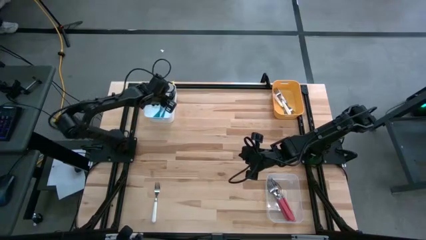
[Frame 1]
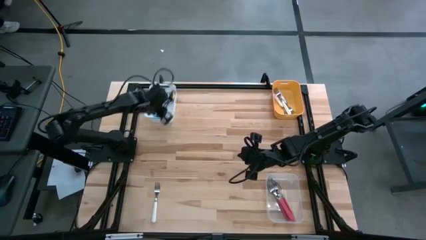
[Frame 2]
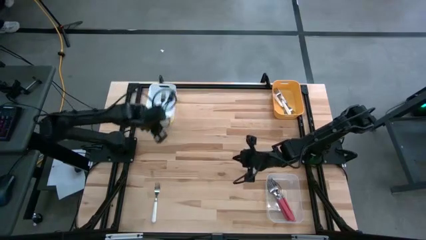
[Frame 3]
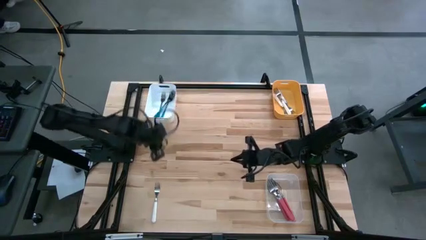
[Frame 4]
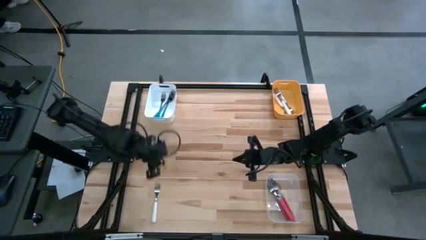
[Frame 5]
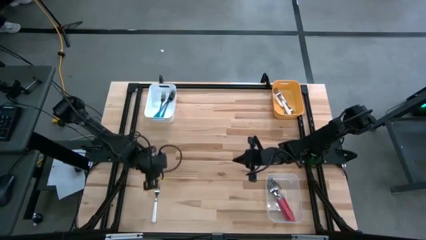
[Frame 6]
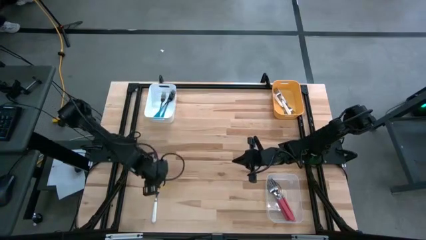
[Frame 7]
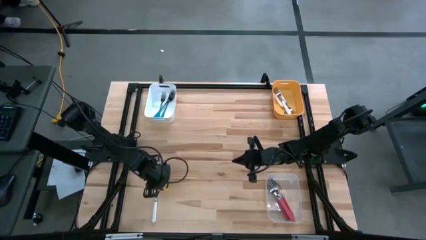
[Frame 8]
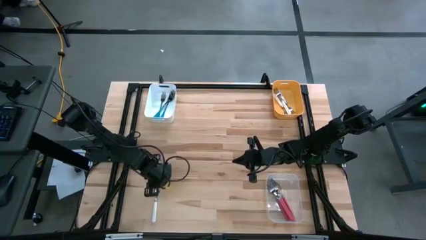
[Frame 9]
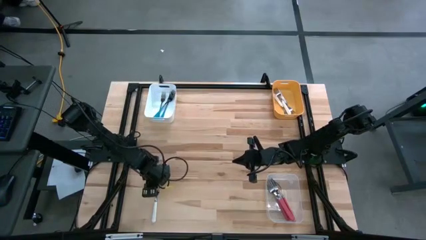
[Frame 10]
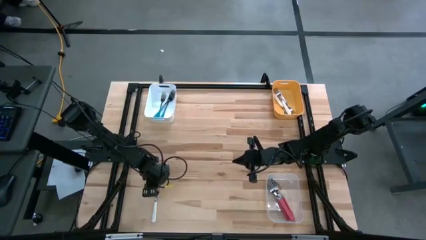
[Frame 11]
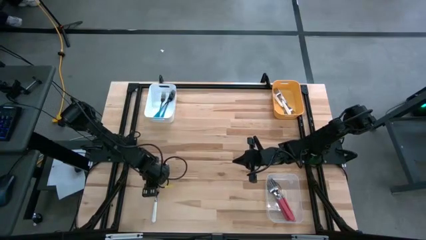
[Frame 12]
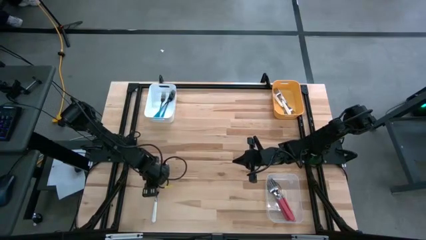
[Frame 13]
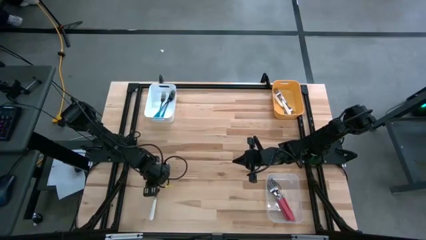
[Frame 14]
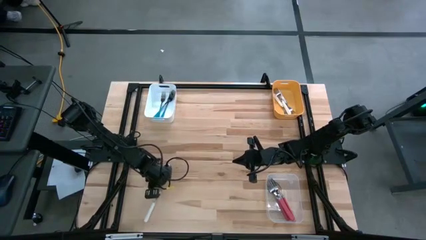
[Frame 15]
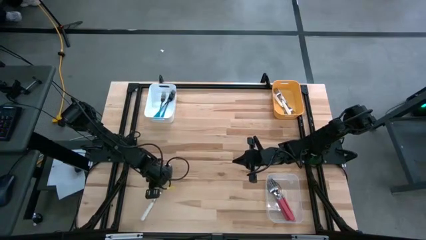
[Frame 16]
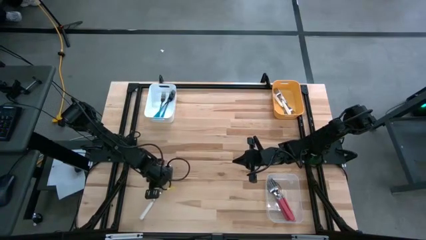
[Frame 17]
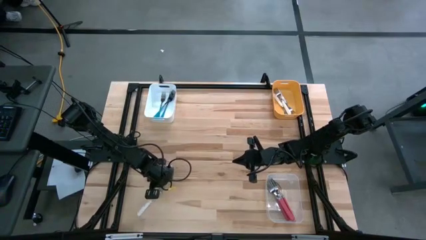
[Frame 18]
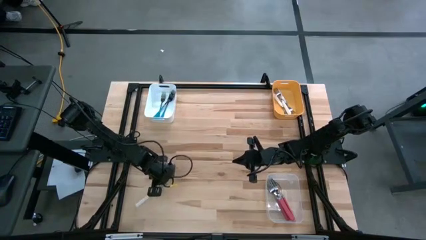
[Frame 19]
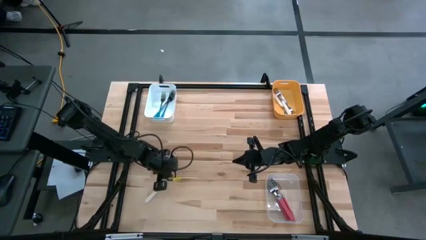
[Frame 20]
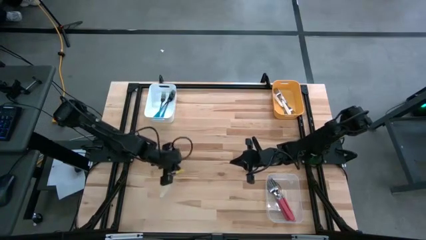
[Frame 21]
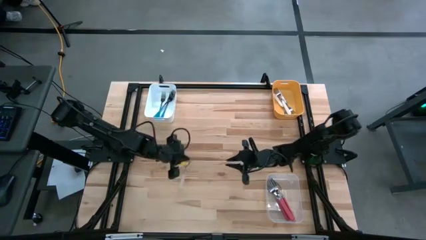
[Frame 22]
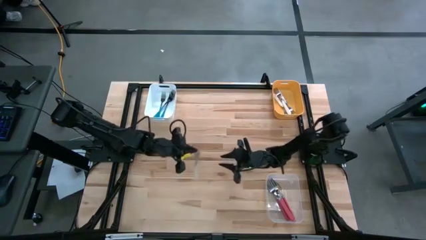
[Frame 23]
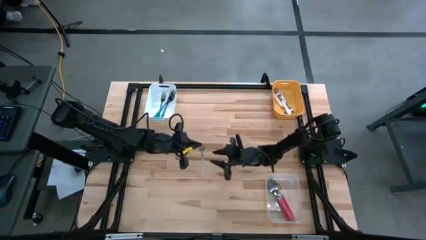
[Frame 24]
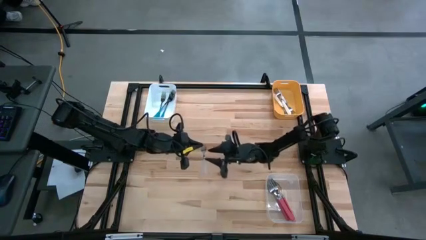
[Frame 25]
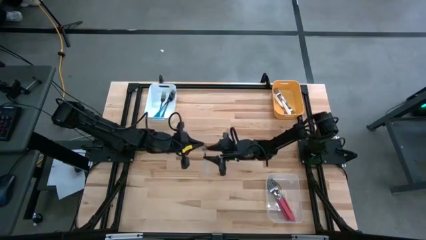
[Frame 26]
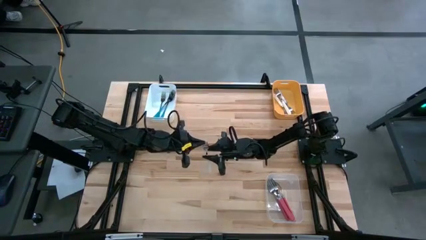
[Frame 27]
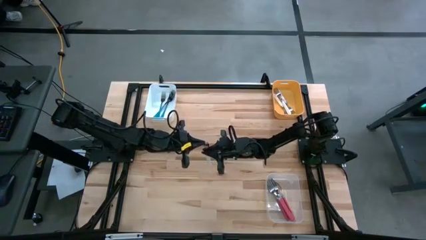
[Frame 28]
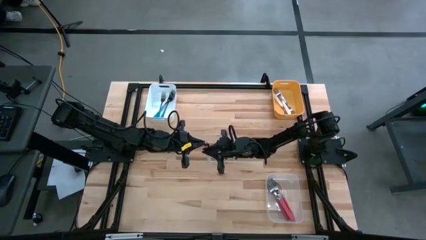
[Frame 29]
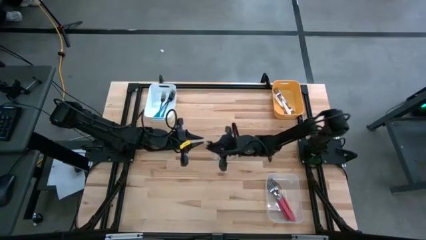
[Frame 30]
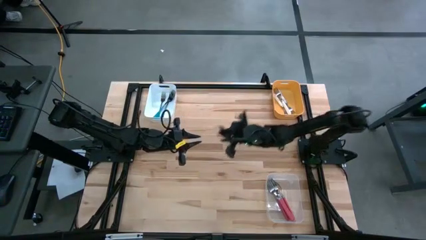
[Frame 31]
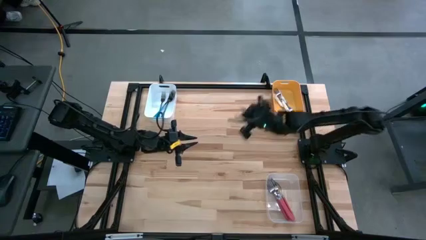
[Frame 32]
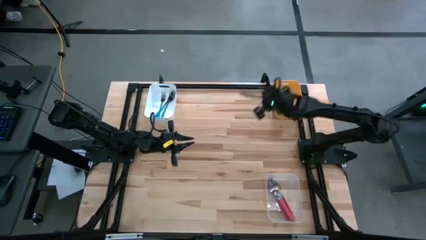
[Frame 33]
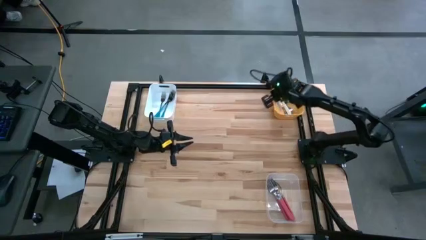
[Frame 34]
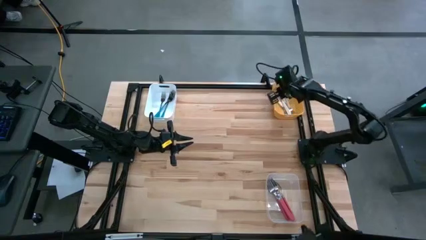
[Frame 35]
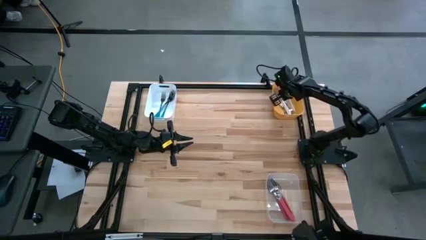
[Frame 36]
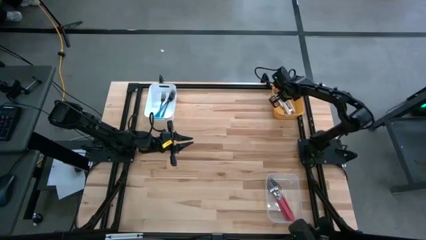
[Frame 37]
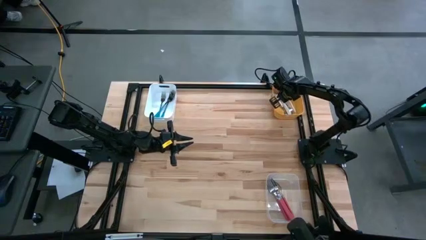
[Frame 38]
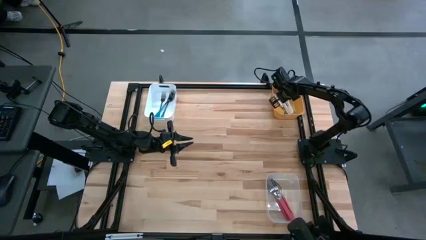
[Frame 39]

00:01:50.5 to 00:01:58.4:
Task: Sort silverware by color (type)
Put the white fork into the yellow bin

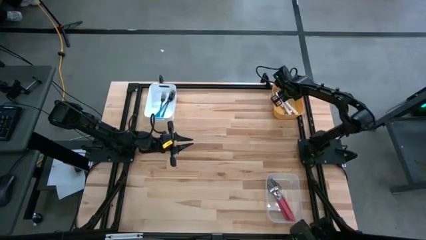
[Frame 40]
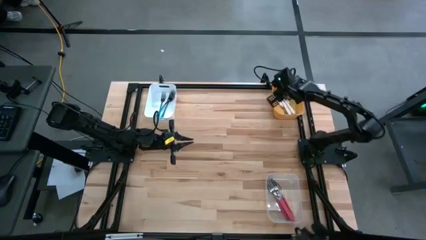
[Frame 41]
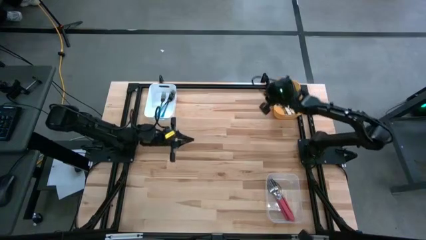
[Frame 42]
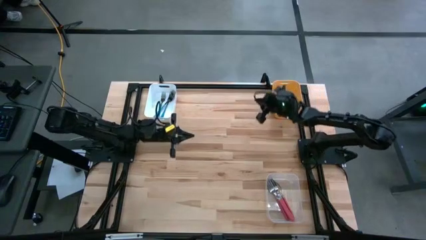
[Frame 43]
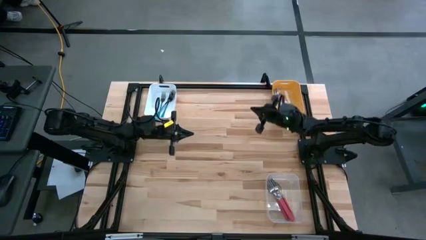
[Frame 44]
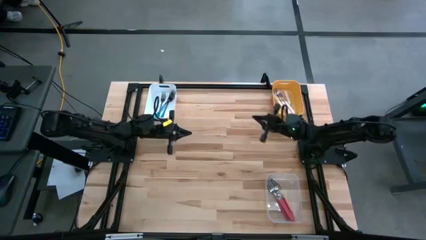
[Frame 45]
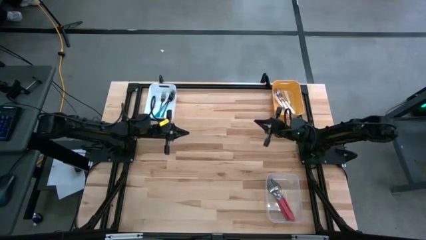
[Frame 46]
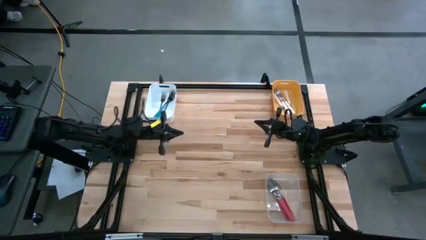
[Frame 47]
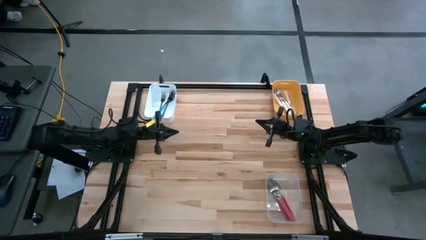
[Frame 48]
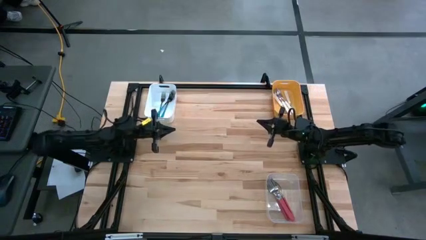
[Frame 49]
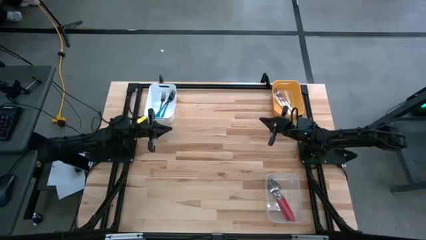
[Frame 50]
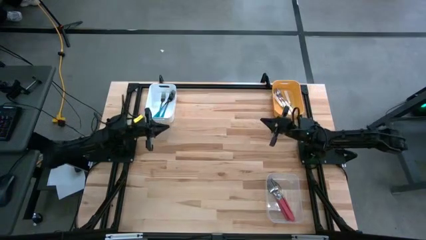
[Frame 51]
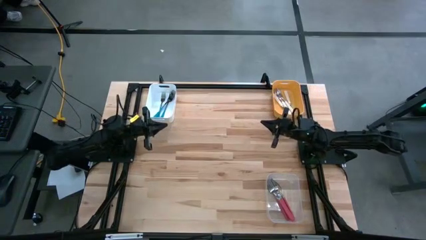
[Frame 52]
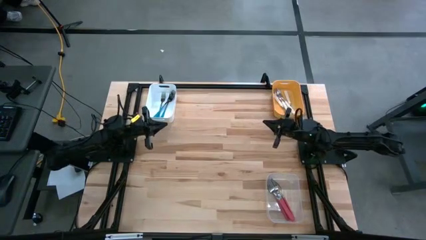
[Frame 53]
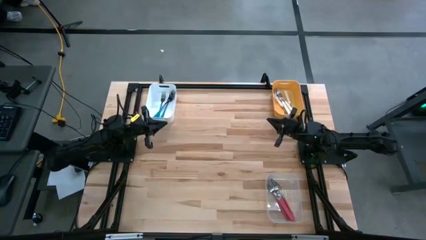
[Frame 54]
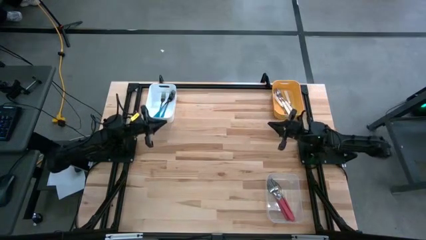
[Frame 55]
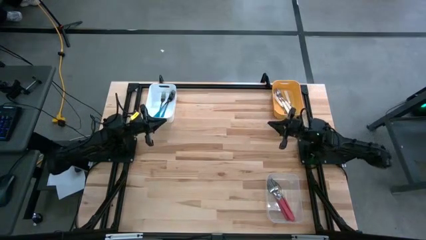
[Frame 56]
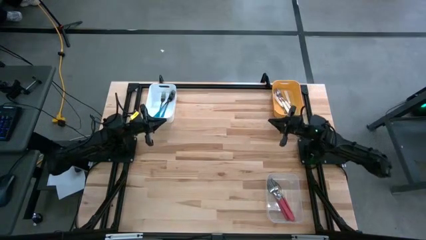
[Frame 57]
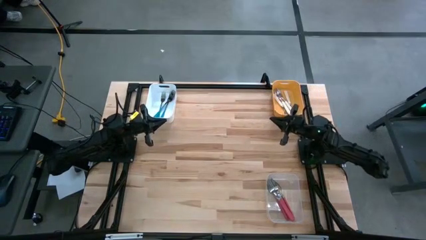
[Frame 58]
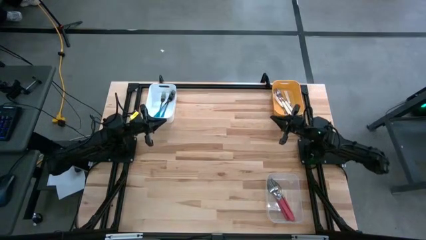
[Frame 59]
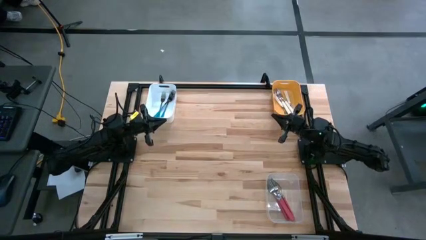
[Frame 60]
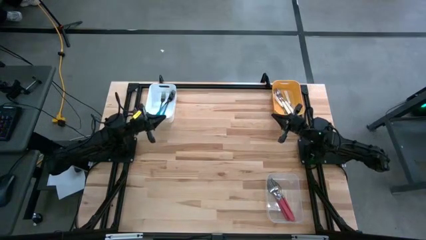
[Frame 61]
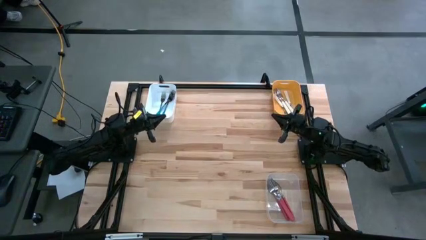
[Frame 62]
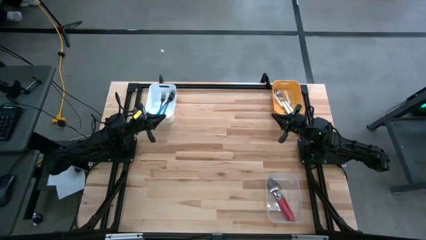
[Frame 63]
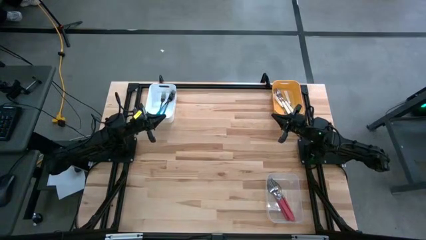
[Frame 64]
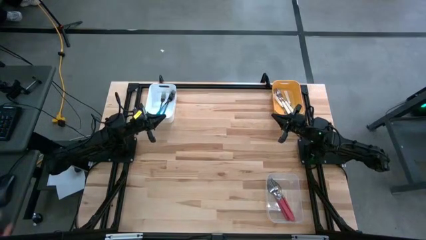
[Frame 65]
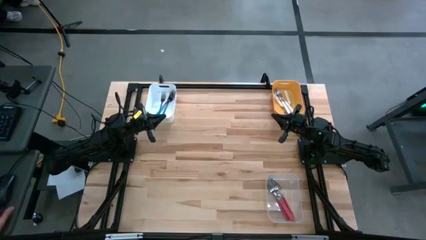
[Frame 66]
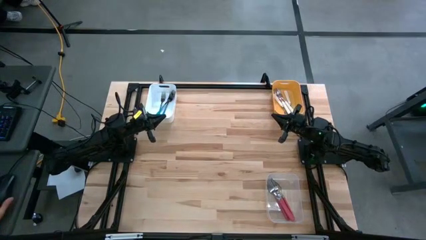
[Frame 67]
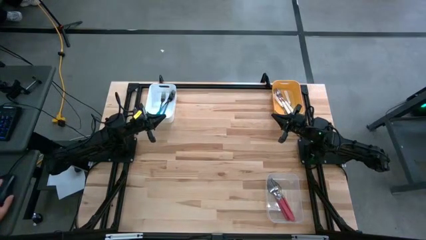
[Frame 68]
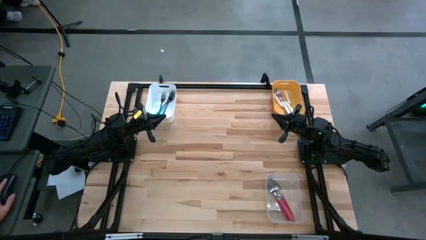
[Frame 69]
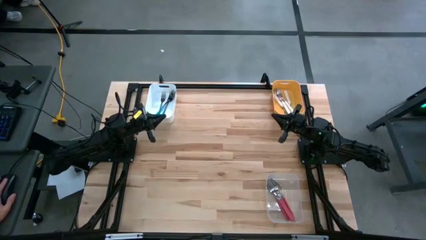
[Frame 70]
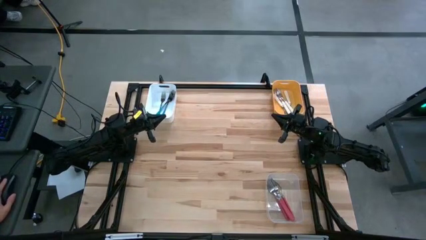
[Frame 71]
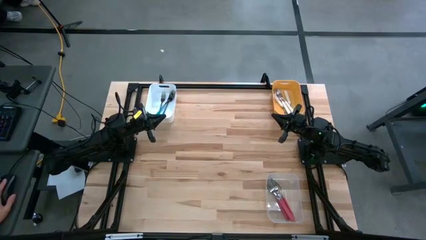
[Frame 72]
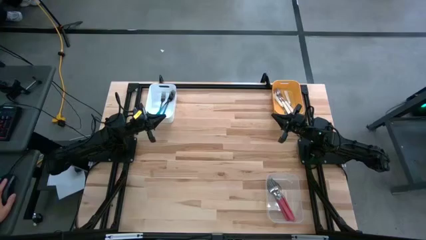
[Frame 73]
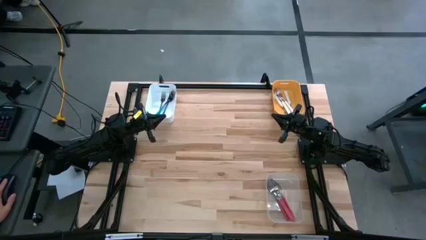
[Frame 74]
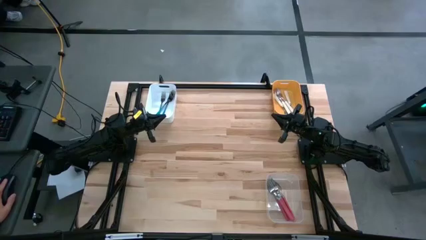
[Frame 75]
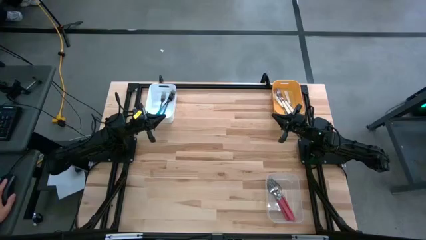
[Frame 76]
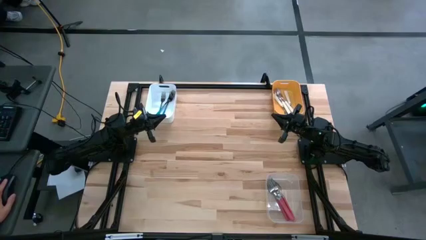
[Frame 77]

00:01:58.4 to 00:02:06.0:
Return to Home Position

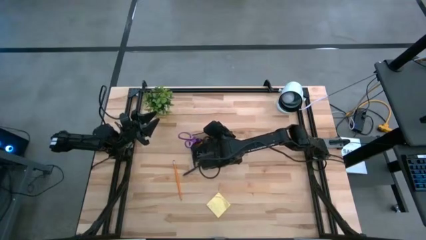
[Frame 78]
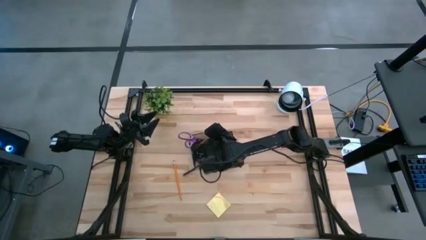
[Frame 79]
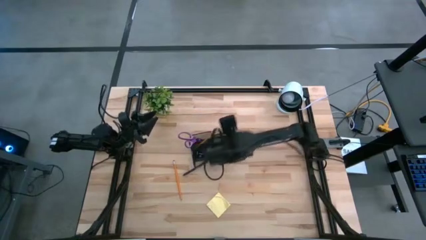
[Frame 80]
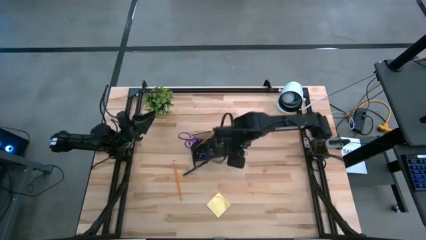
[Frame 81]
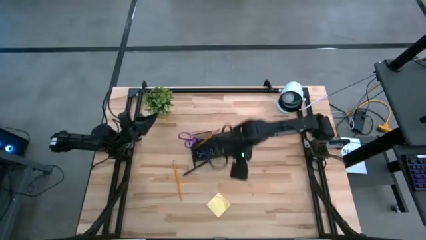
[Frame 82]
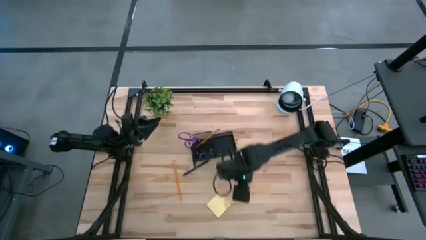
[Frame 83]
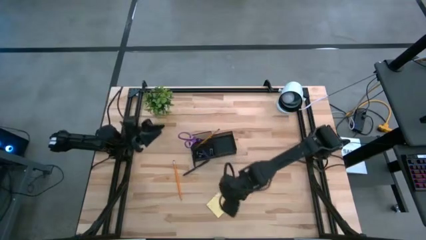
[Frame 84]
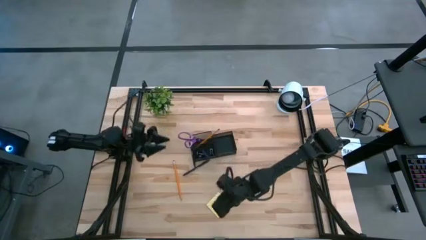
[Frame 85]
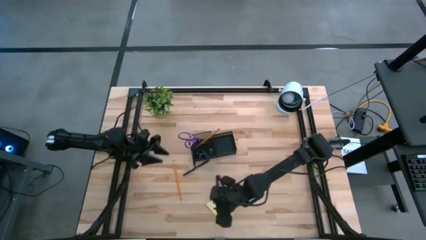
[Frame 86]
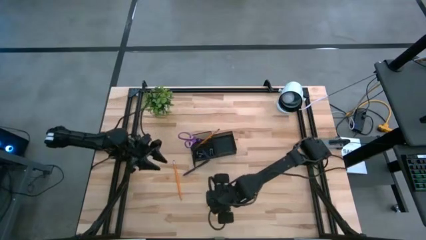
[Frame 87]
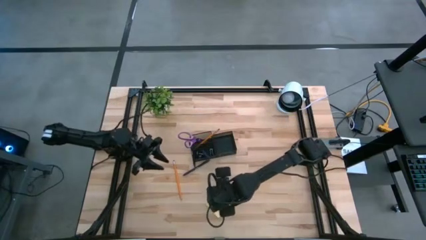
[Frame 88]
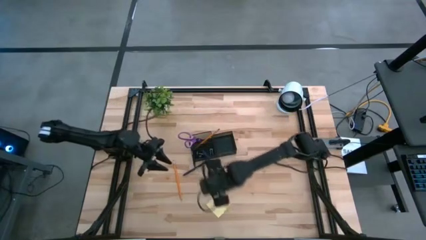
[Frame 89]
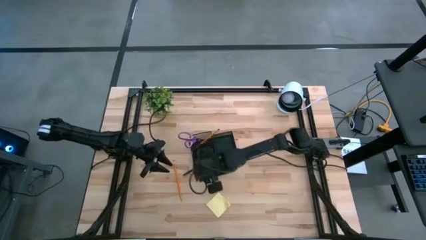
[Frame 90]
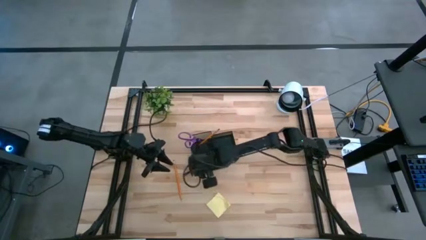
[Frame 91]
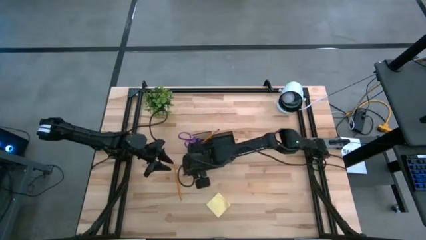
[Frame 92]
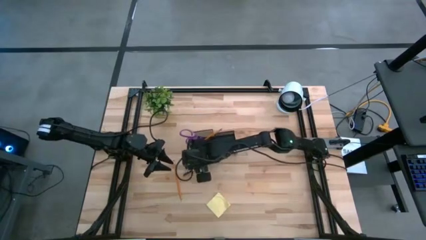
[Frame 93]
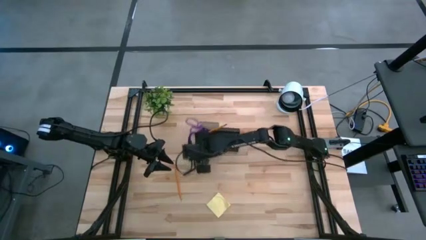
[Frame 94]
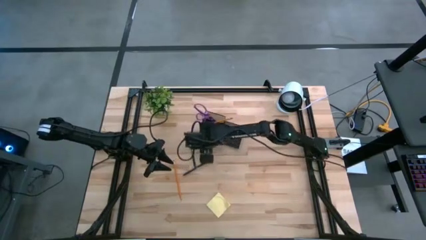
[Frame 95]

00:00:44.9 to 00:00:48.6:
Task: Pick and place office supplies into organizer
Adjust the black desk organizer
